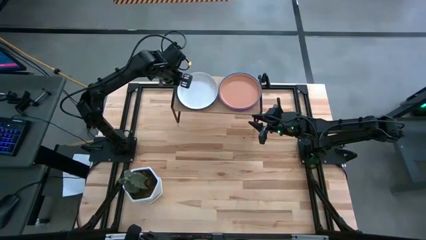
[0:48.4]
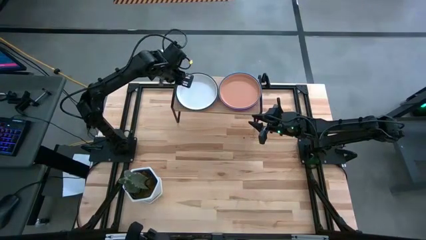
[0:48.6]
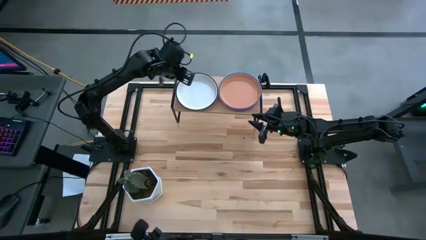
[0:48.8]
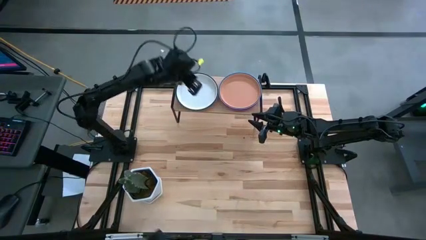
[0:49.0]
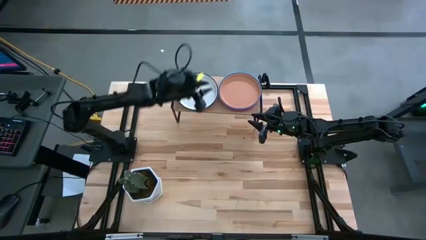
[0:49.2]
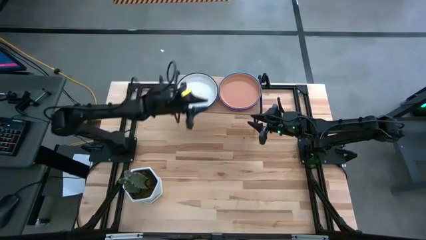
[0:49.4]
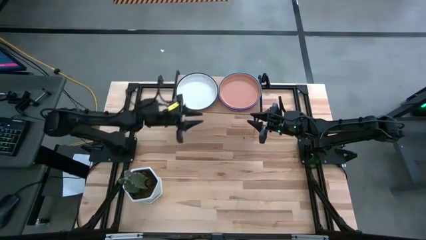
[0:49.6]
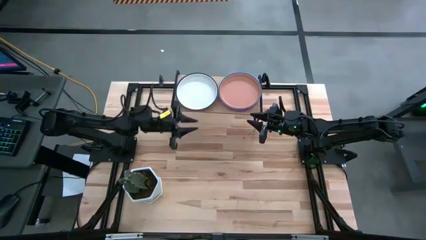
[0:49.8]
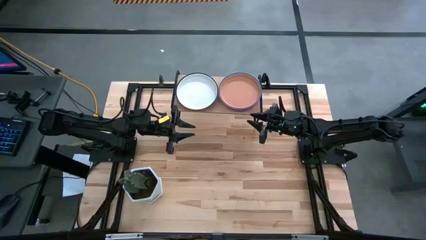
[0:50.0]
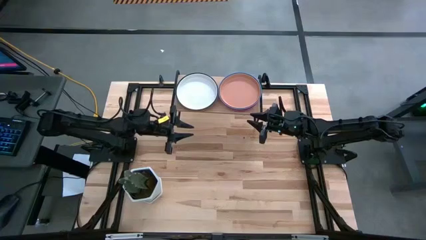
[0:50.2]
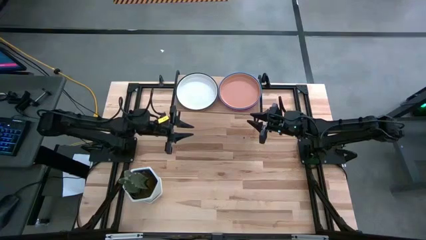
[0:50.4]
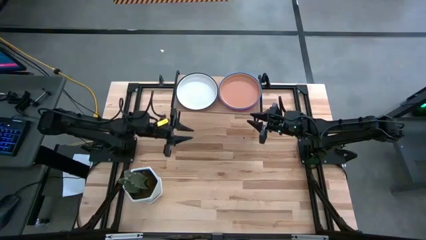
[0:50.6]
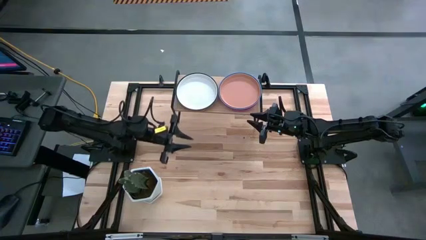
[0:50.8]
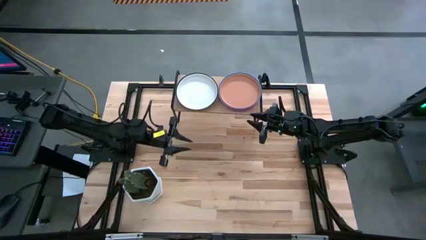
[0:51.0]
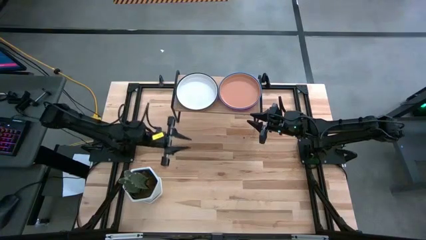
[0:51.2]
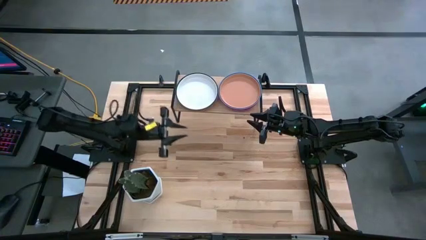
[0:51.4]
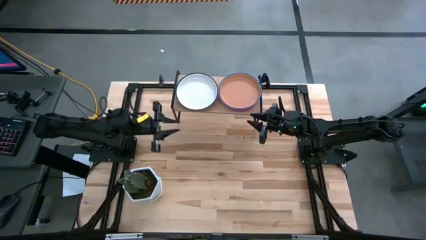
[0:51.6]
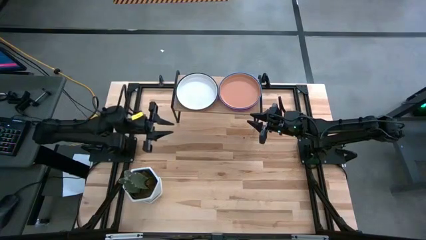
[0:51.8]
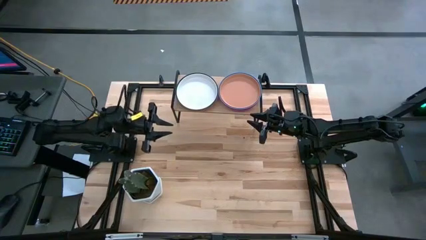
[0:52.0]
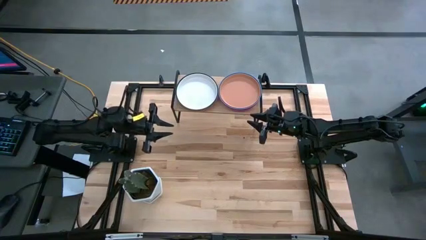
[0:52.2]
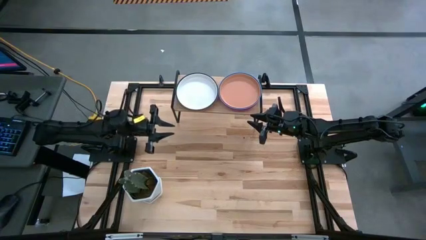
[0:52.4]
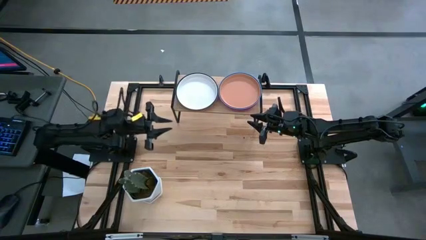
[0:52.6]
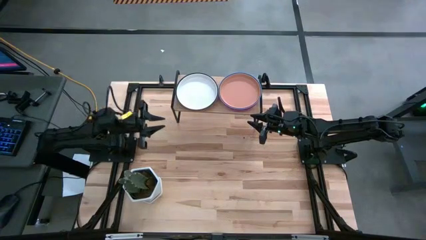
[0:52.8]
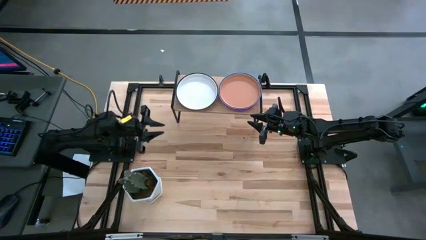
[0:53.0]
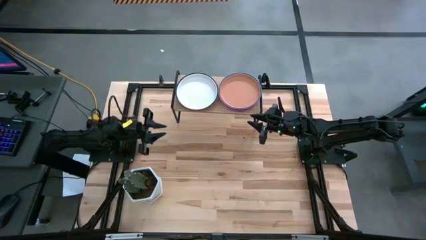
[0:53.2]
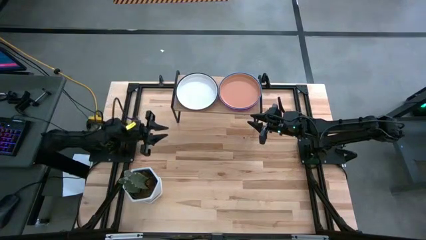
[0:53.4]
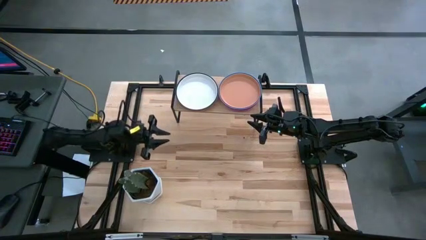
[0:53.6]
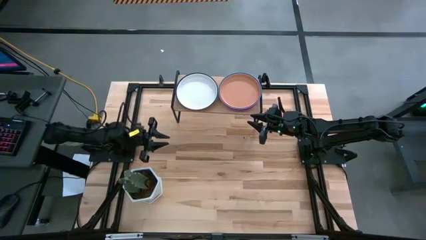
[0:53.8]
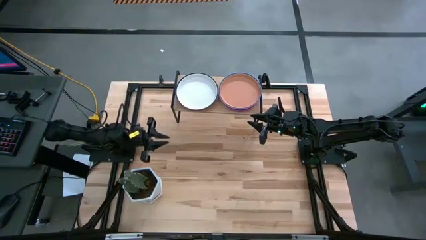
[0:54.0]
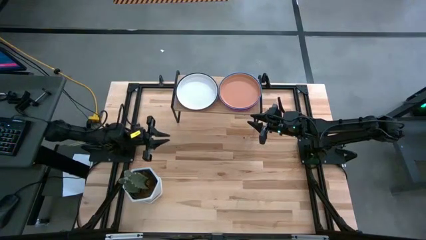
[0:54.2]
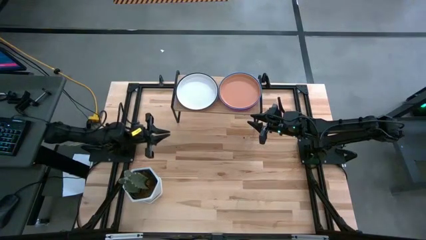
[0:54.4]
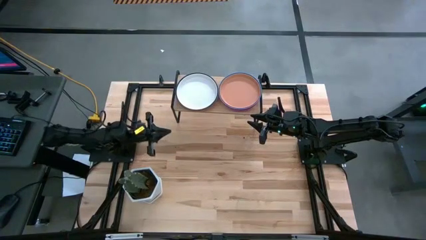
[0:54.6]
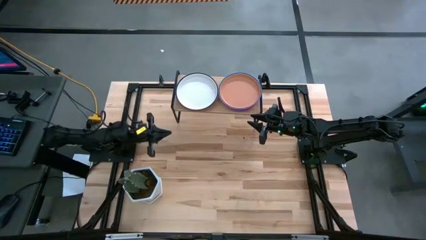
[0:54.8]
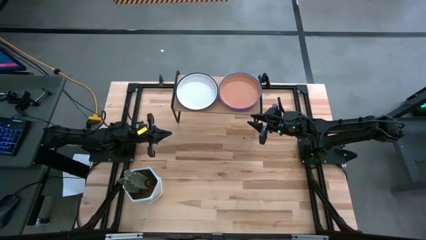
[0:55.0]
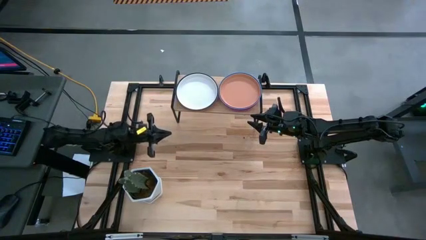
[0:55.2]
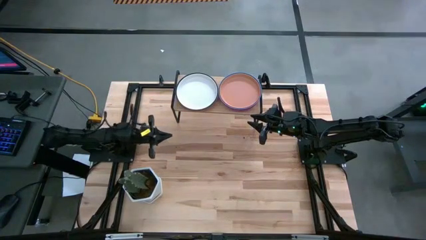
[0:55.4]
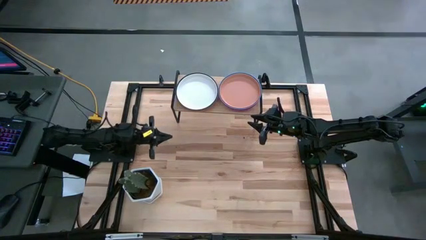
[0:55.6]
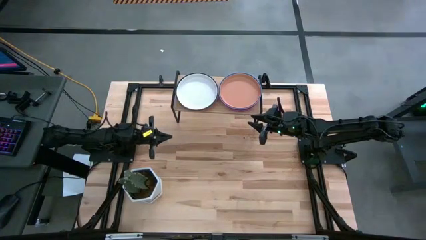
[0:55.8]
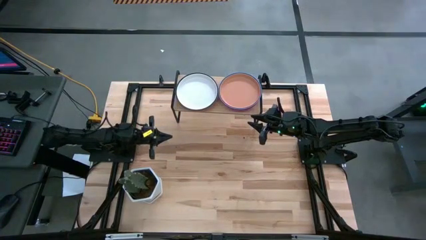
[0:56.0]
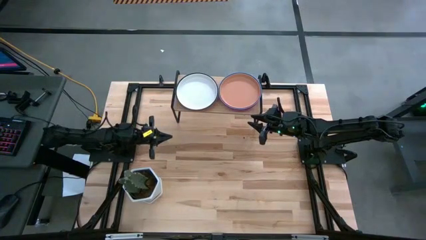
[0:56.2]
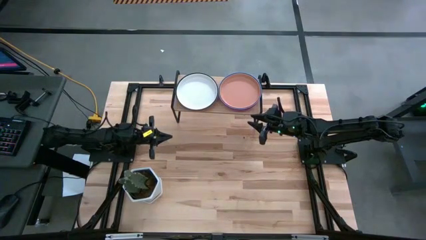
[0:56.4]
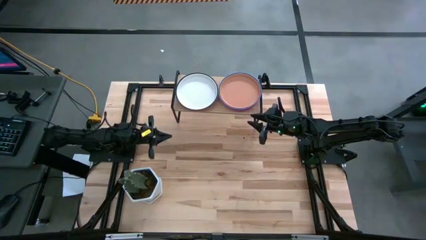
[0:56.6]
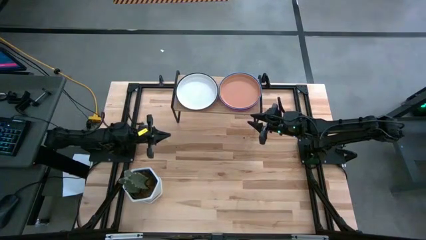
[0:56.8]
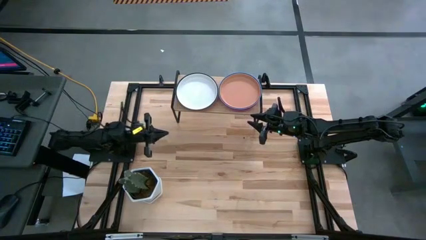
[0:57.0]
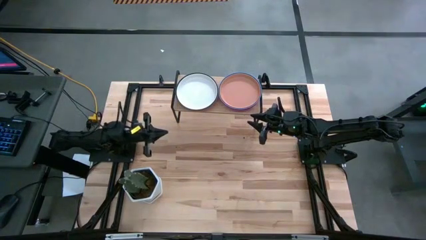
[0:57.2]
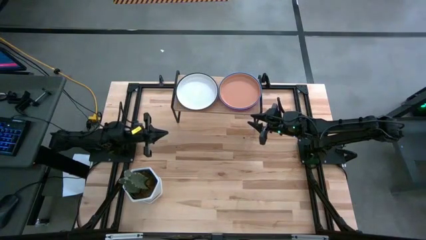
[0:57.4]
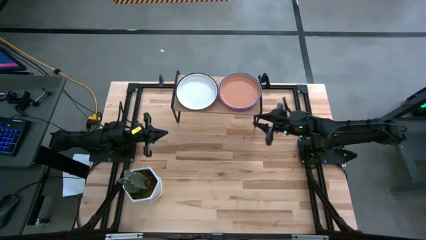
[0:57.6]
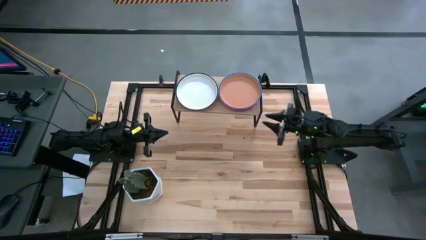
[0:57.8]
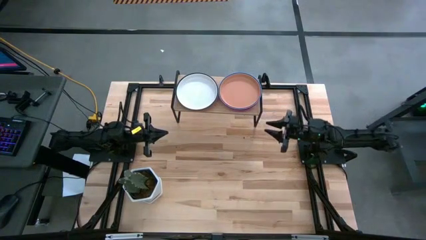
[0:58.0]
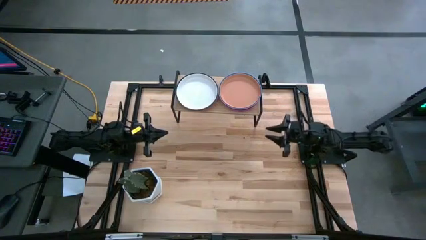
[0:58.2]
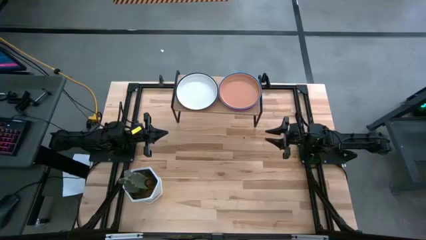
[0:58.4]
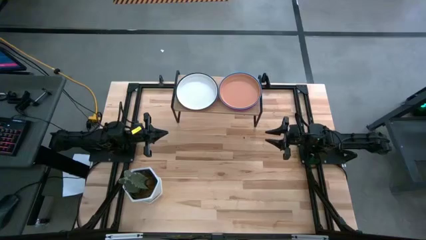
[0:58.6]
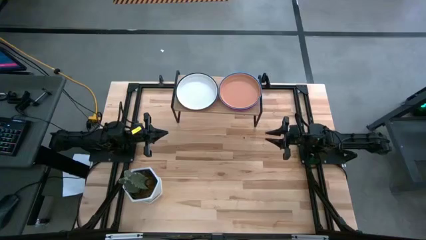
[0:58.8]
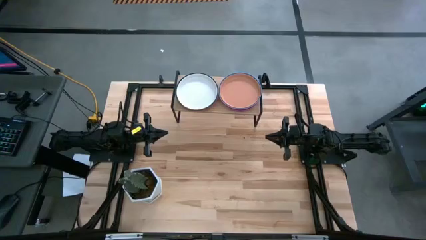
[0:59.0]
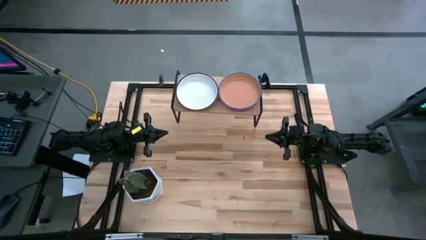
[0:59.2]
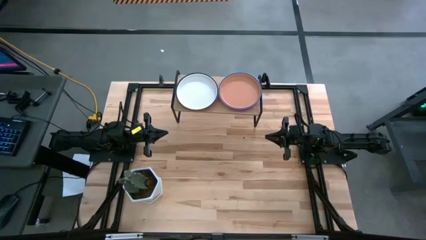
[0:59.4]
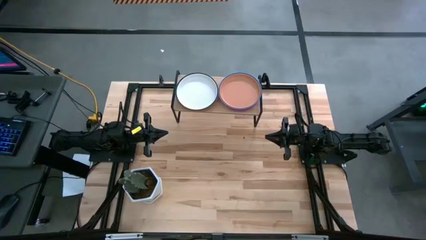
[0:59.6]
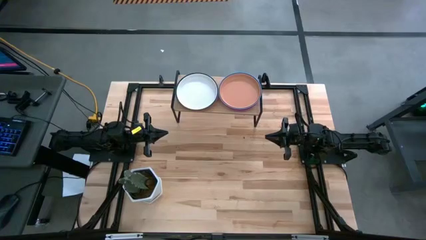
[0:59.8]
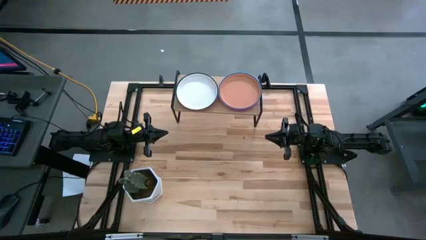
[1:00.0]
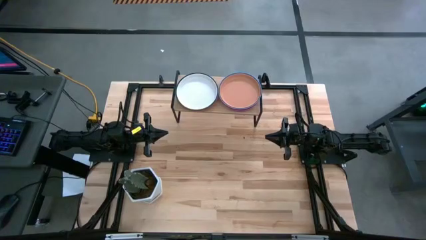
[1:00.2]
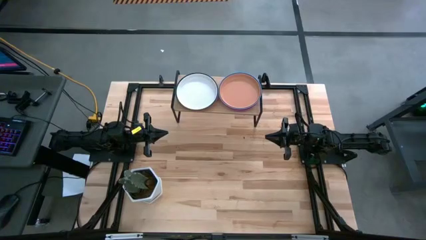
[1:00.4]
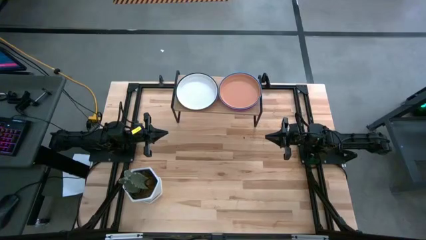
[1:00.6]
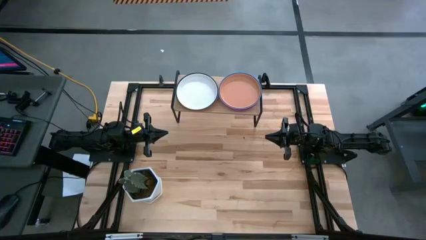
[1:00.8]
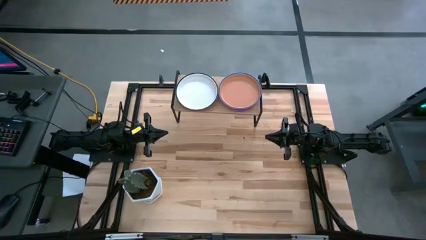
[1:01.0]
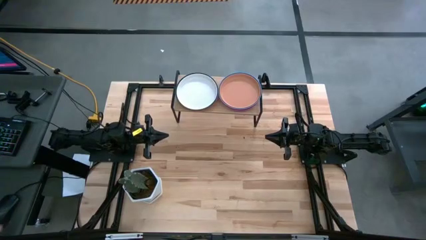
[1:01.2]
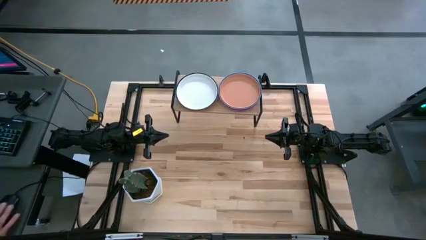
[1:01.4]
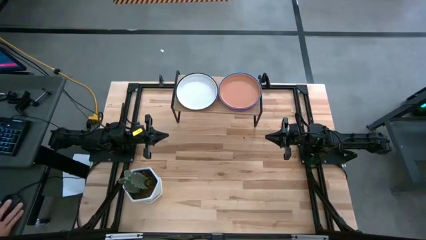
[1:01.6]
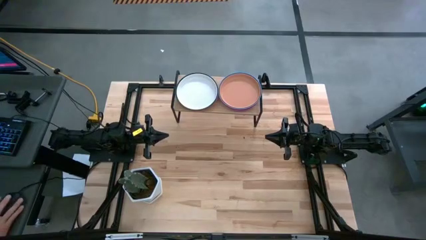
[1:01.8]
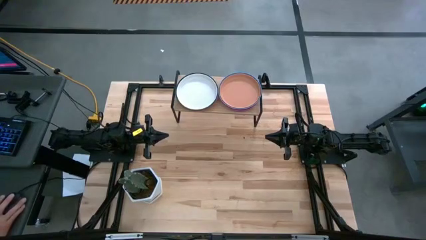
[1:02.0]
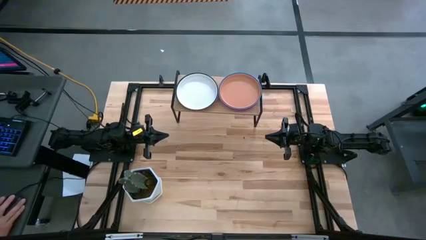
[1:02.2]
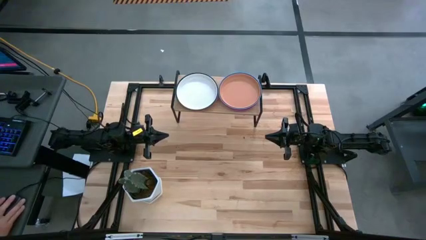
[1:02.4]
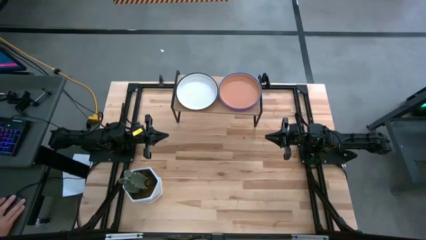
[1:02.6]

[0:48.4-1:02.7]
Task: Place and stack plates onto a shelf
Return to Home Position
